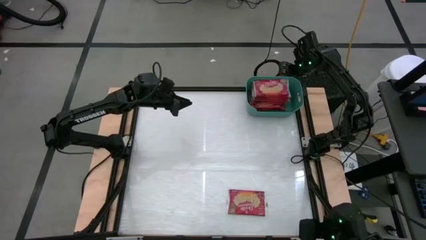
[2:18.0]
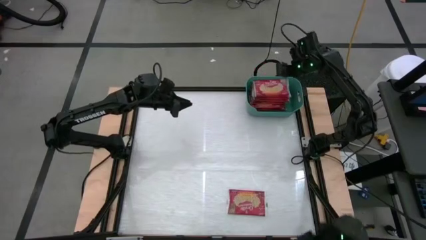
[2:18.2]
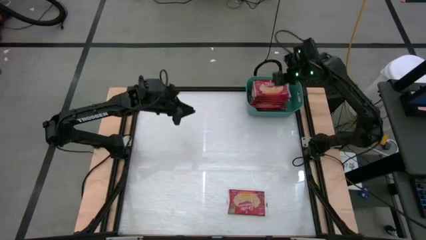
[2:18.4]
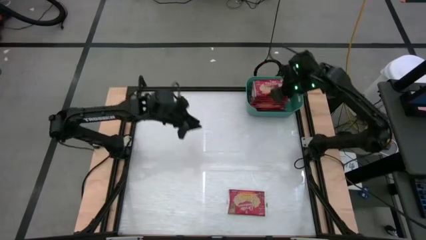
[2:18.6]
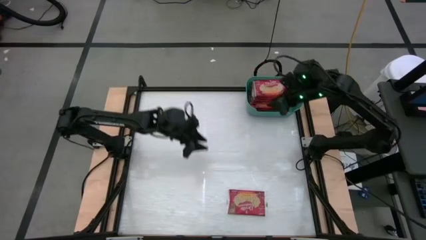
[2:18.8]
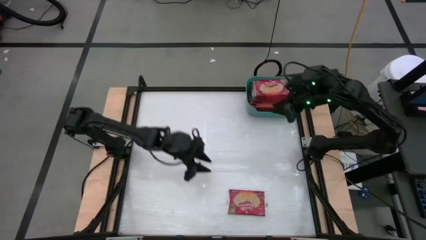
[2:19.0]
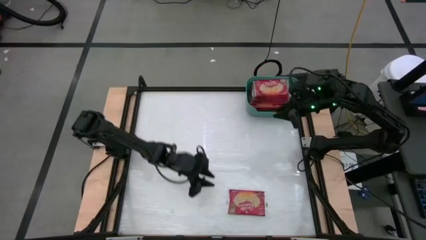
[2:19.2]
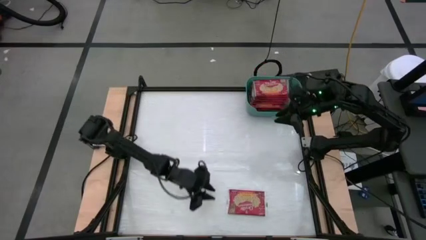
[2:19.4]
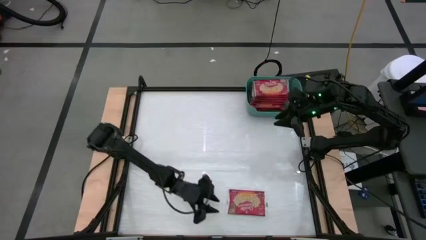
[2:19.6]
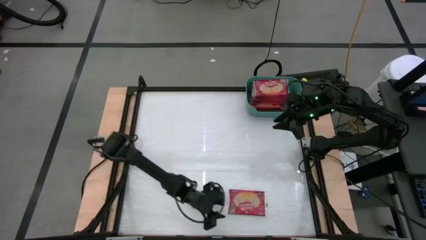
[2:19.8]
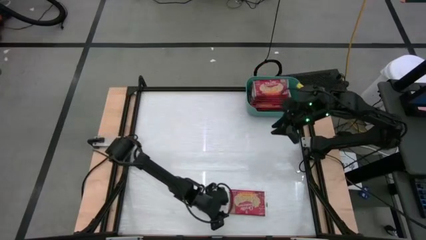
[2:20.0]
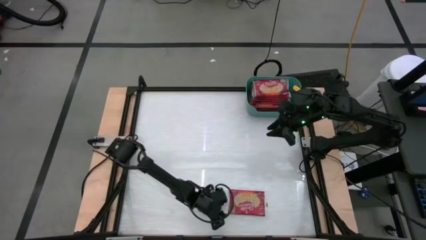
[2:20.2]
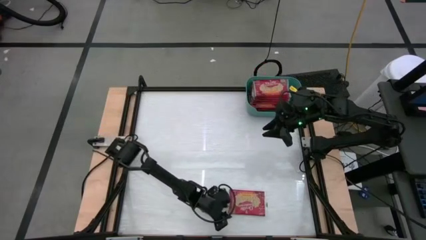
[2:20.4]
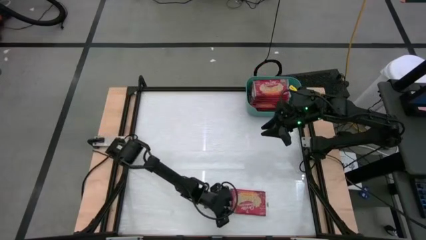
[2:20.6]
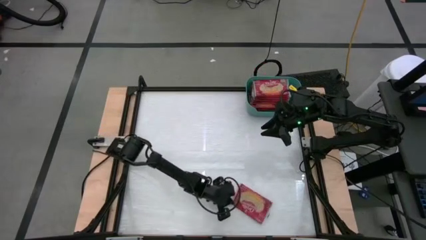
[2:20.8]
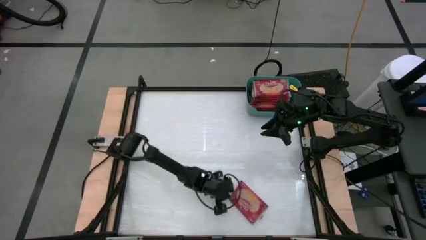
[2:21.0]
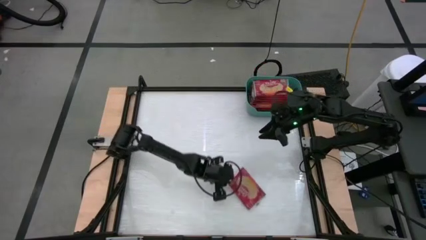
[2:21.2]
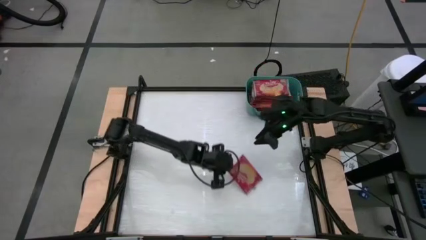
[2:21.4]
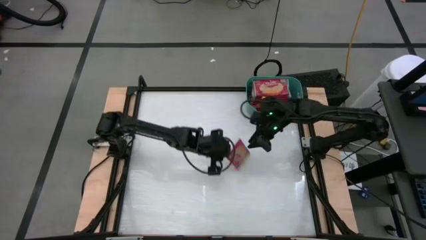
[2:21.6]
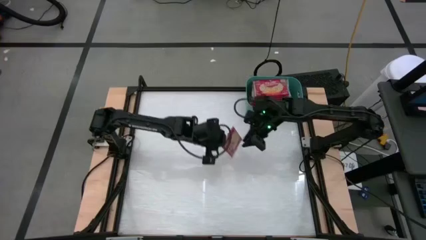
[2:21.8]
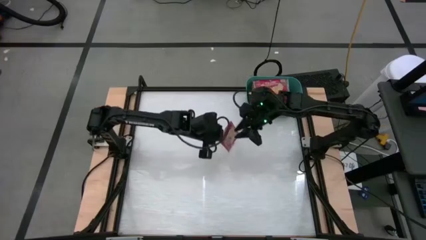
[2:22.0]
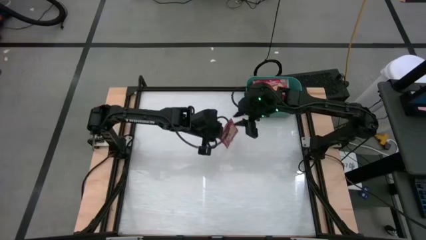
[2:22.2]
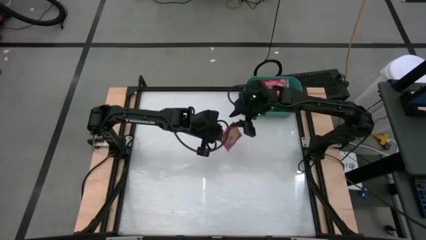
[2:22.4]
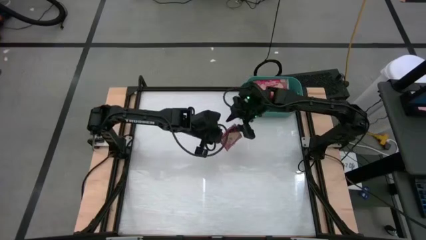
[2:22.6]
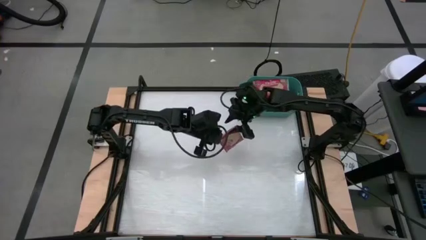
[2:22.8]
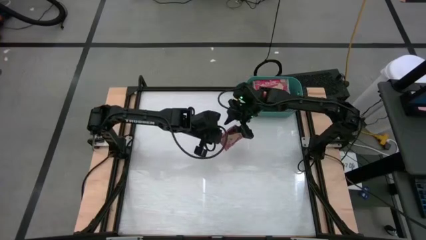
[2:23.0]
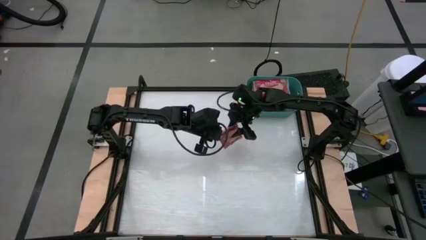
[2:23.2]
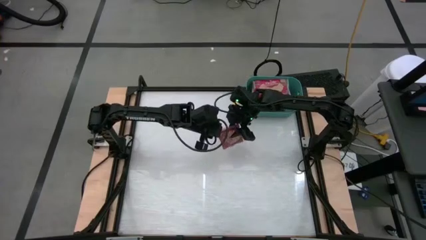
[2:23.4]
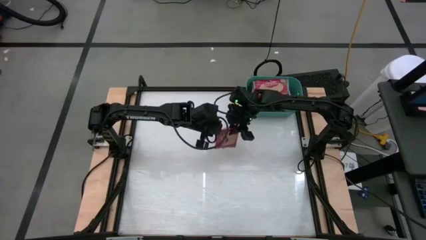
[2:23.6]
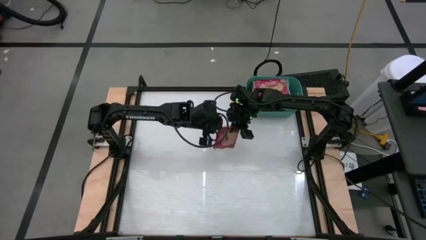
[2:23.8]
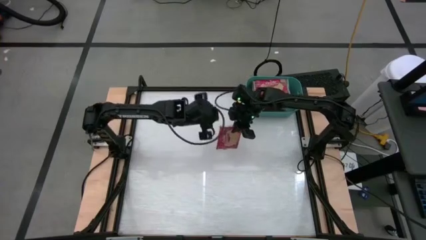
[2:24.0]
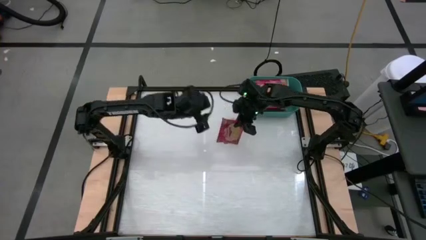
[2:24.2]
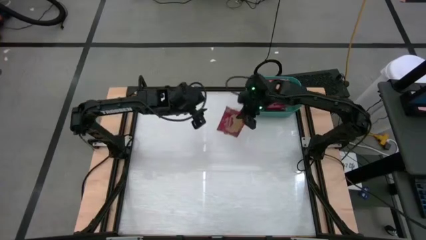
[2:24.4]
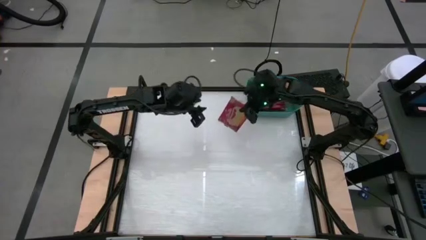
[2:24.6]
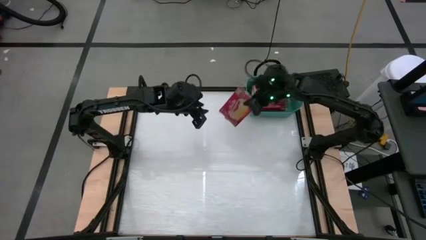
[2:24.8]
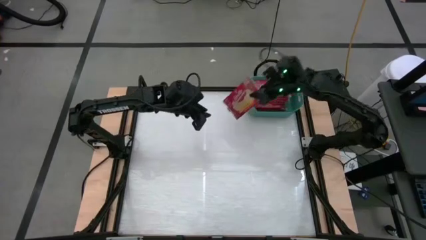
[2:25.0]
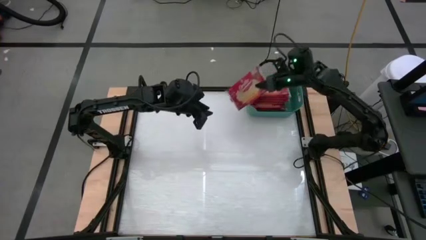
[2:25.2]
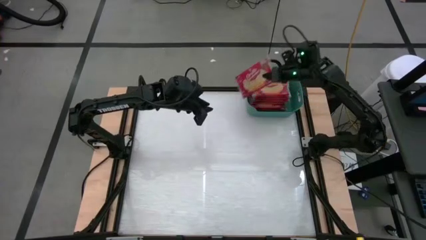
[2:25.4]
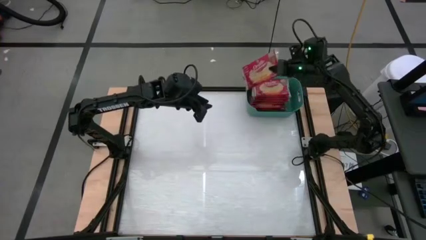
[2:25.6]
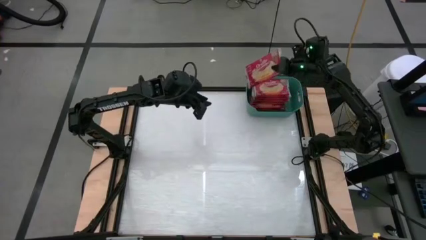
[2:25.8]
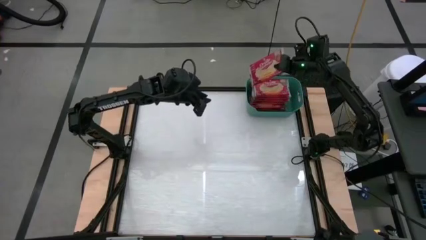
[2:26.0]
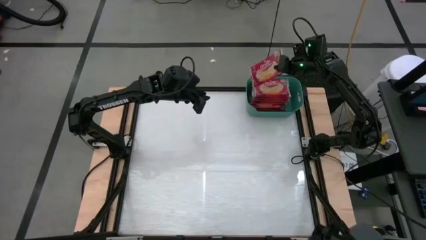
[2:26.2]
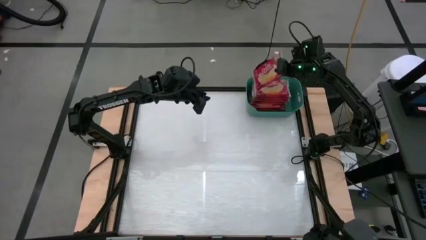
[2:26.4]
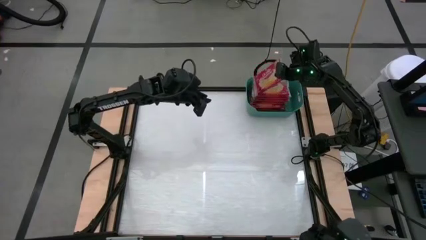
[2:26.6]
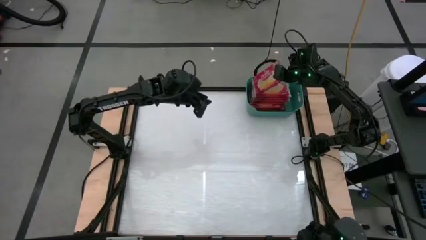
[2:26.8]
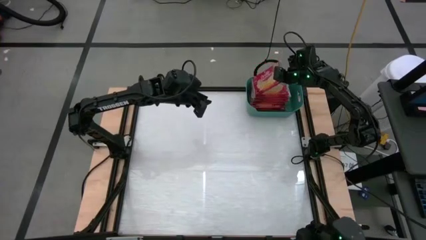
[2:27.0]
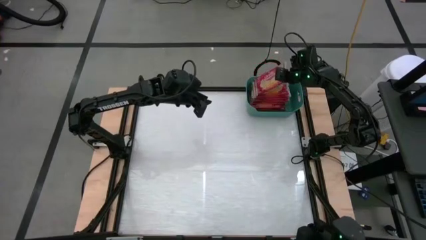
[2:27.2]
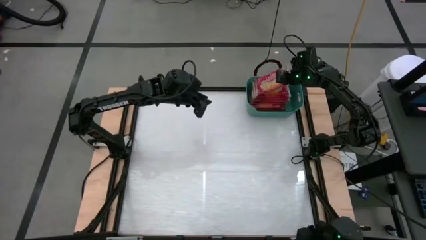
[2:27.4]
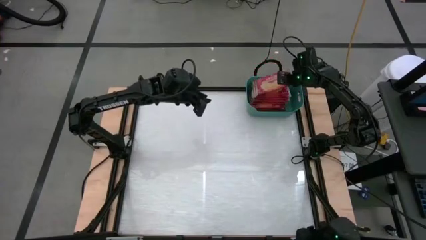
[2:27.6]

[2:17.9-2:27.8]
Task: Sort popcorn bags into baskets
Put the red popcorn bag into the green bin

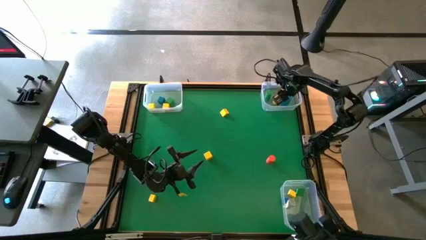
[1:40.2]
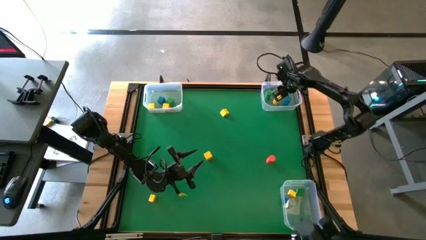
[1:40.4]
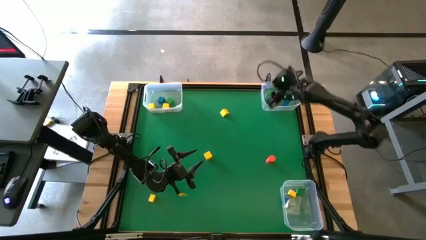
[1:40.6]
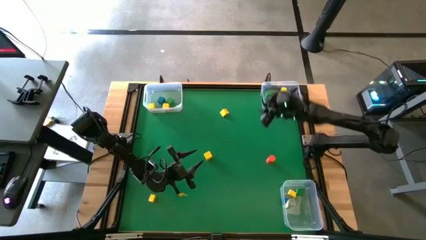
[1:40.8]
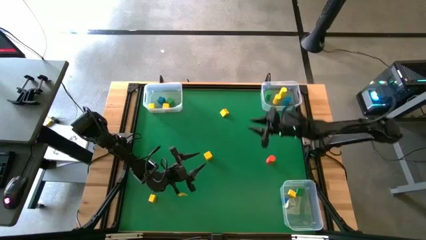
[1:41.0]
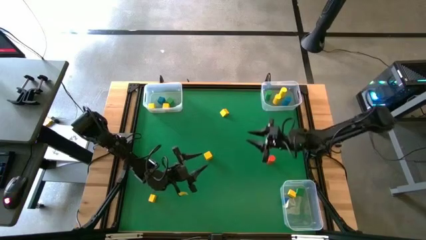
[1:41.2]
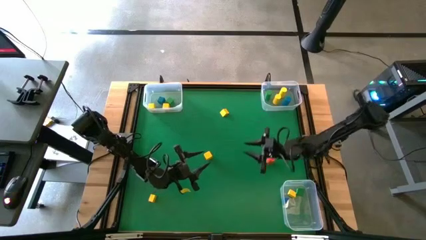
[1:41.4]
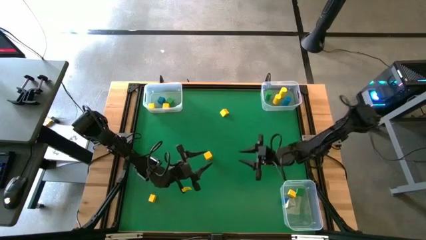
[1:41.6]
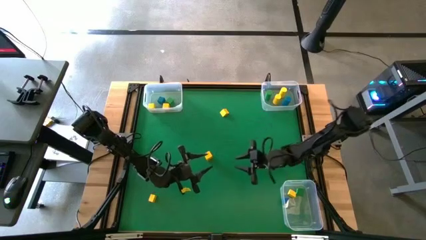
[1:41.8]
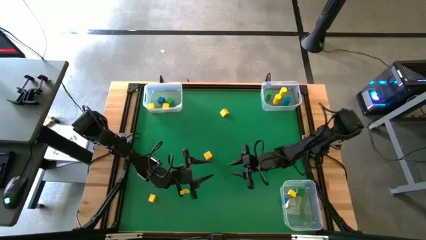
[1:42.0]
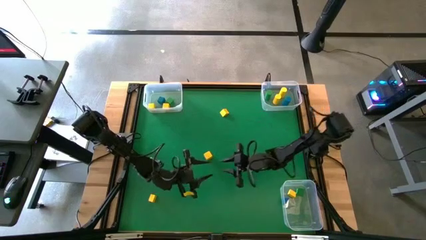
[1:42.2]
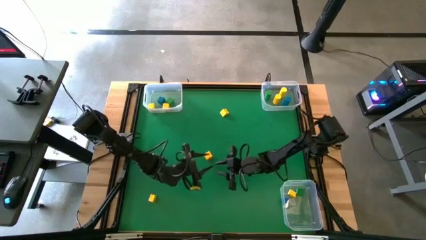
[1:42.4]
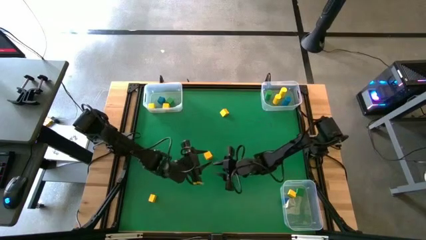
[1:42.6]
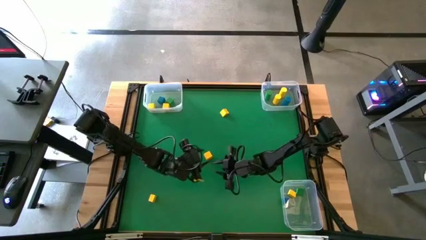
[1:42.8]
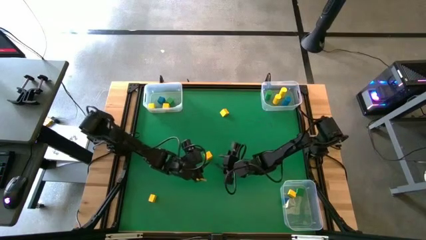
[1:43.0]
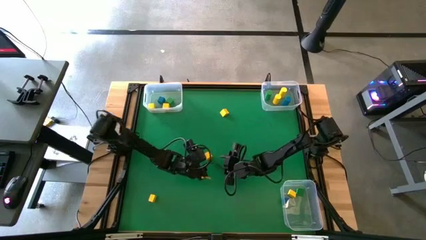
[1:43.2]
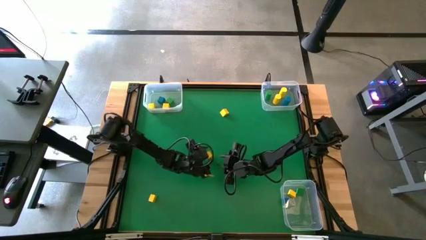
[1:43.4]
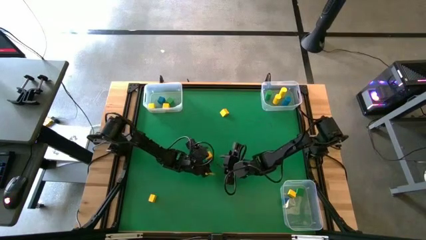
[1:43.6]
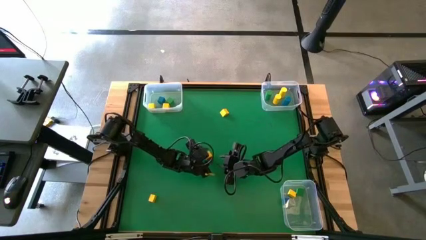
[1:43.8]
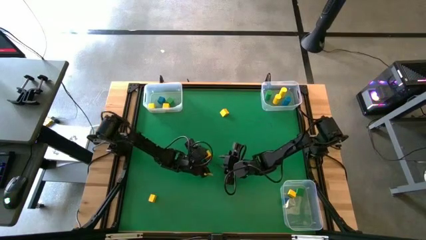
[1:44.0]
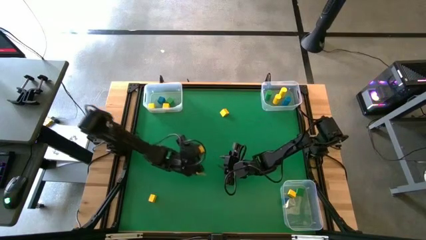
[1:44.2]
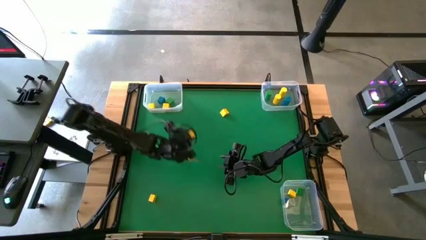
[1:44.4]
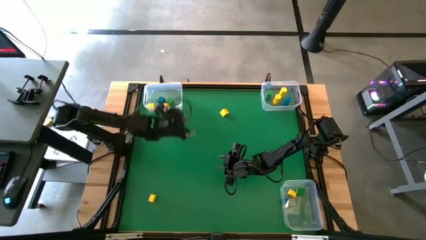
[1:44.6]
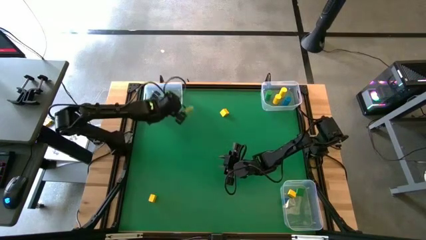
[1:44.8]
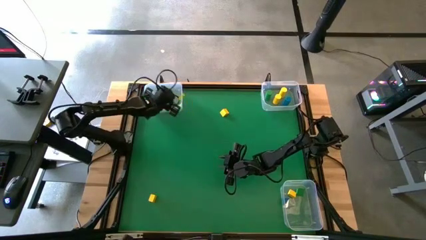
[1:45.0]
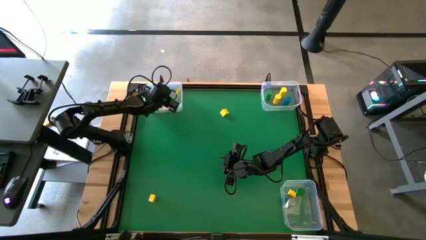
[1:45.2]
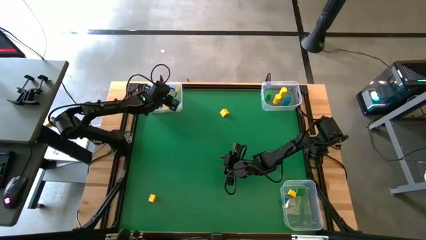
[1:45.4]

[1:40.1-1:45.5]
Task: Sort blocks by size
Put the yellow cube block into the top left transparent bin
